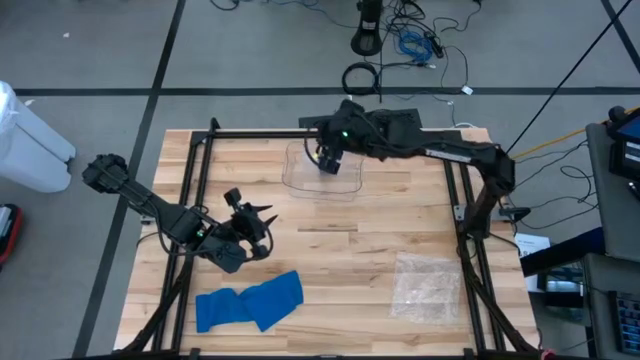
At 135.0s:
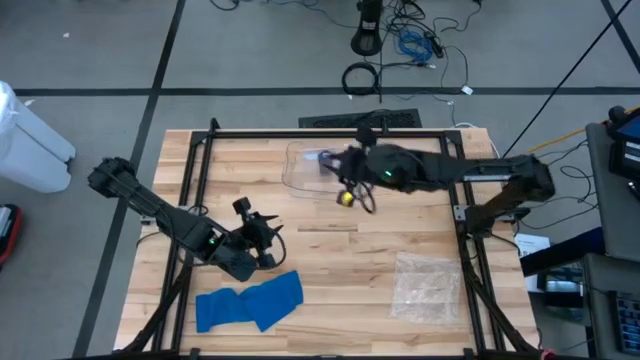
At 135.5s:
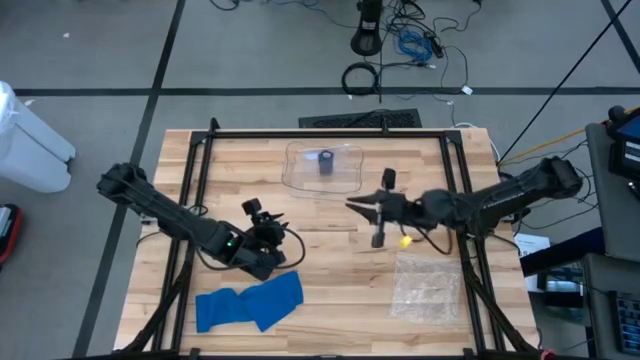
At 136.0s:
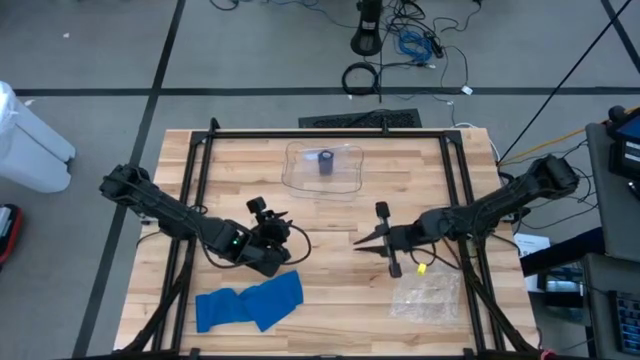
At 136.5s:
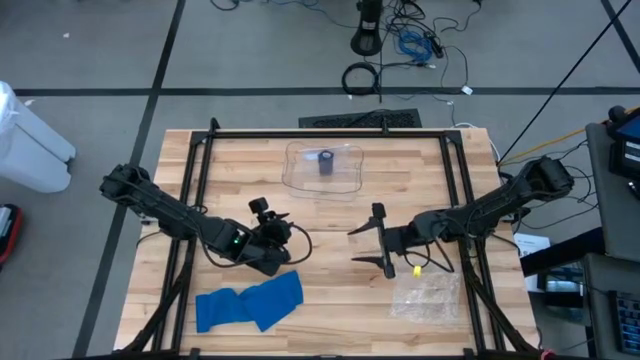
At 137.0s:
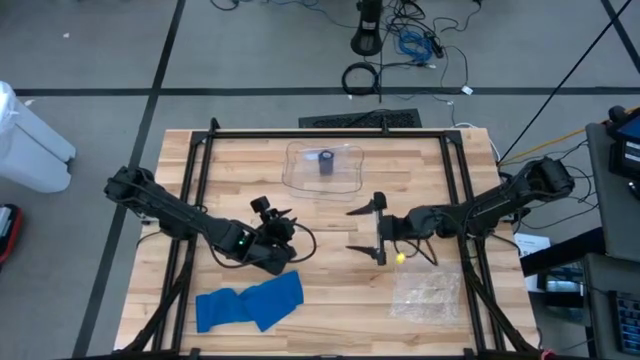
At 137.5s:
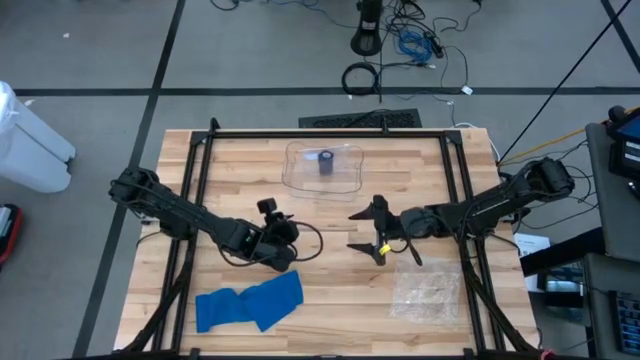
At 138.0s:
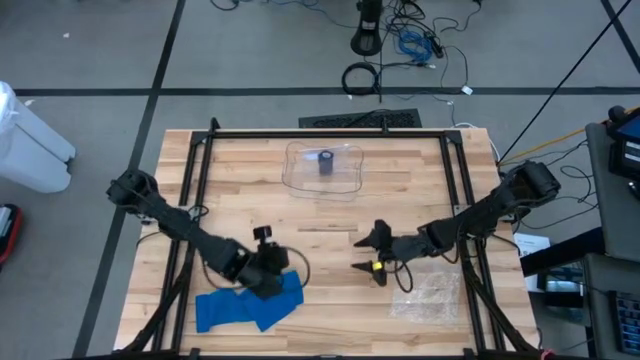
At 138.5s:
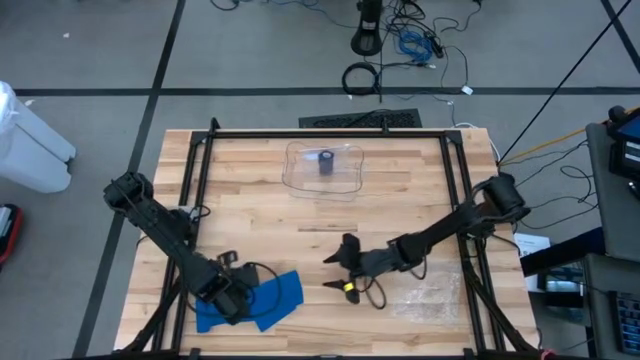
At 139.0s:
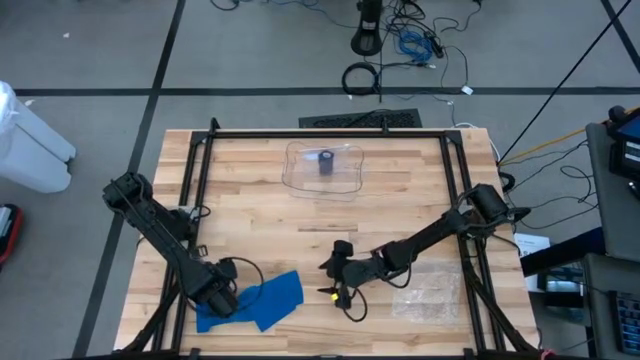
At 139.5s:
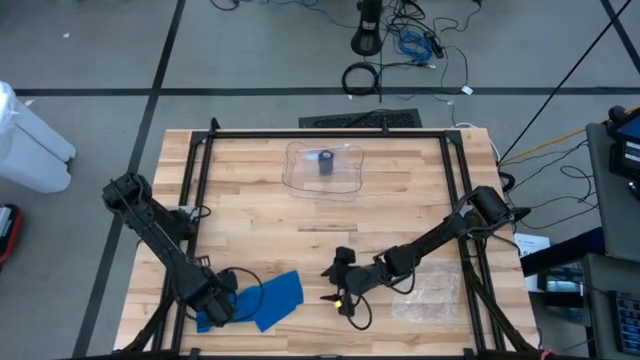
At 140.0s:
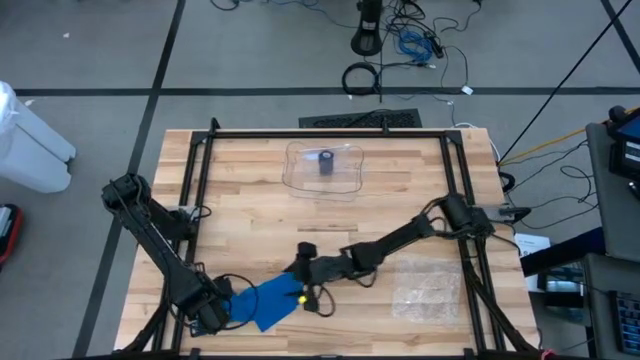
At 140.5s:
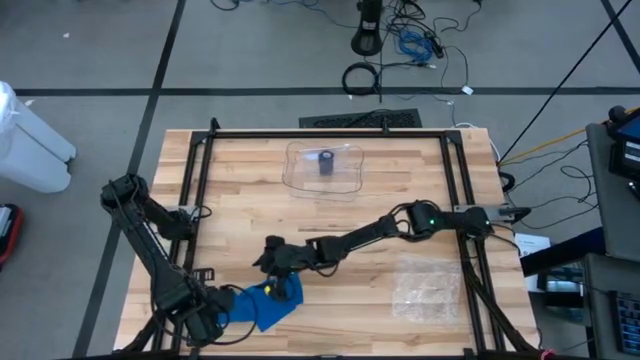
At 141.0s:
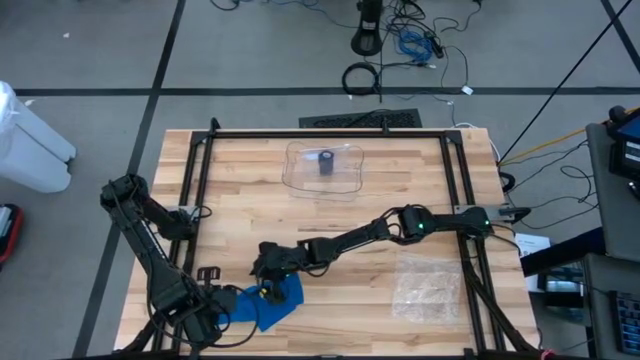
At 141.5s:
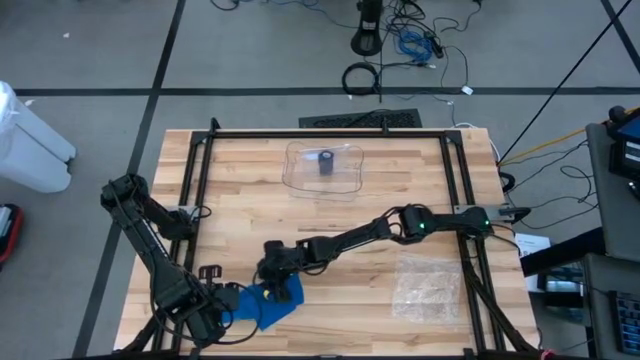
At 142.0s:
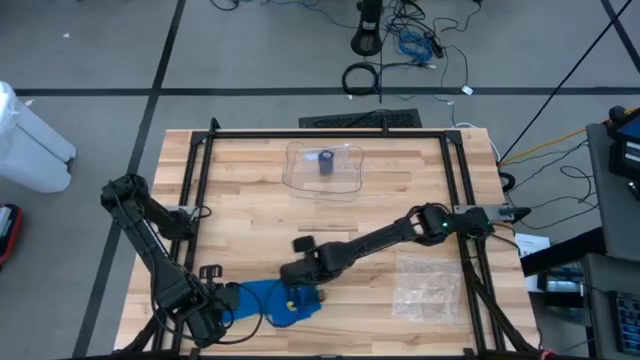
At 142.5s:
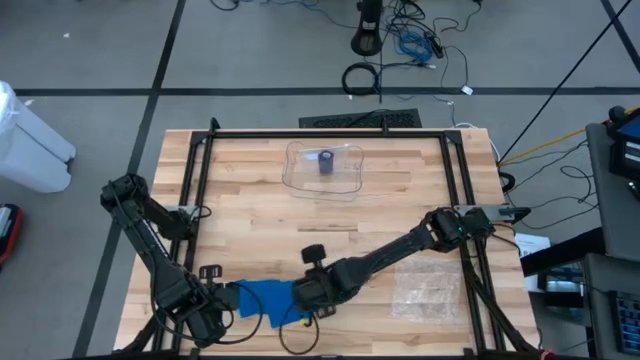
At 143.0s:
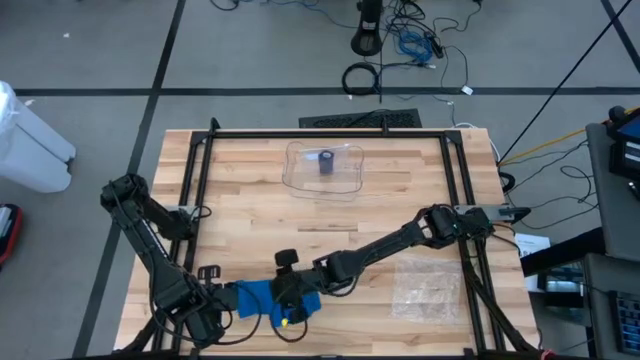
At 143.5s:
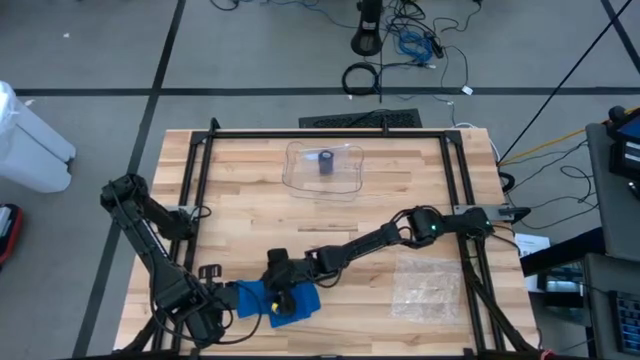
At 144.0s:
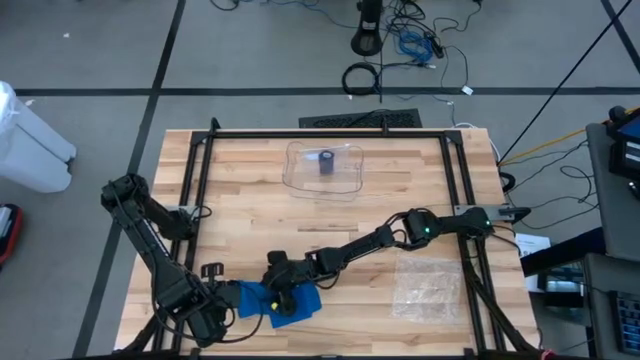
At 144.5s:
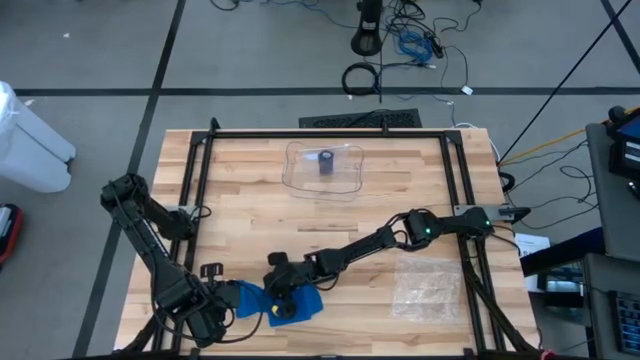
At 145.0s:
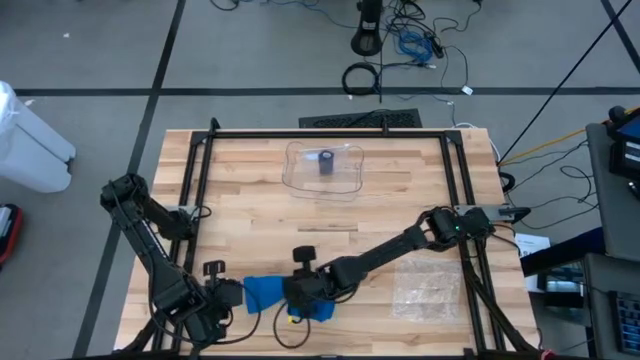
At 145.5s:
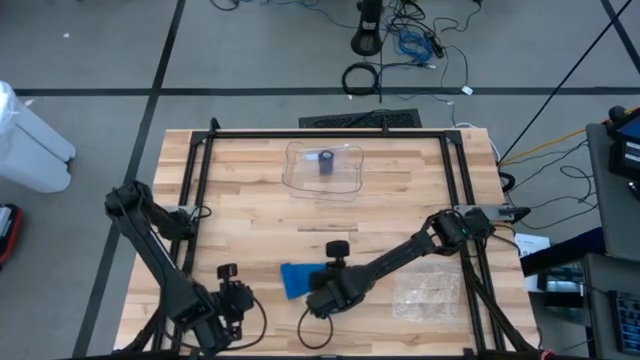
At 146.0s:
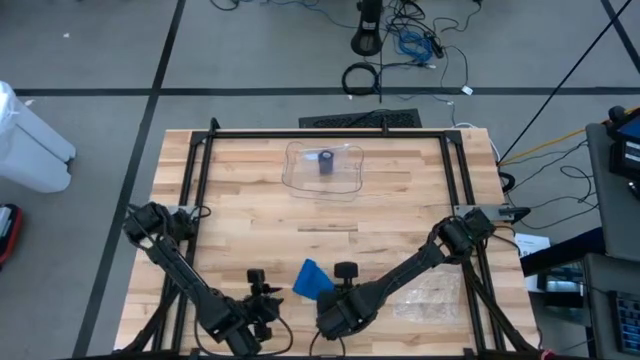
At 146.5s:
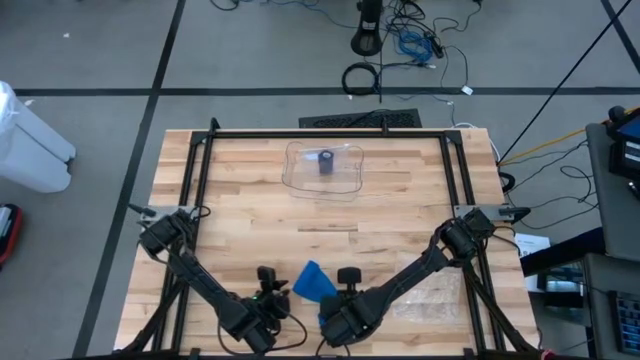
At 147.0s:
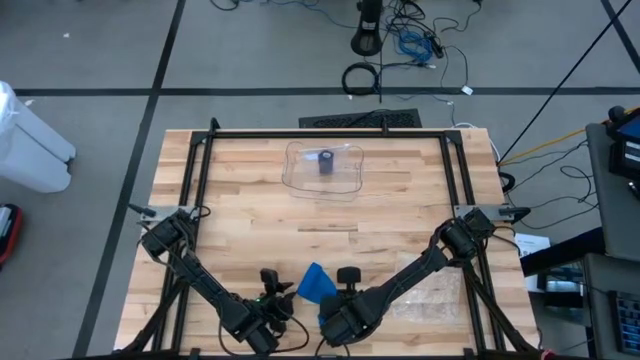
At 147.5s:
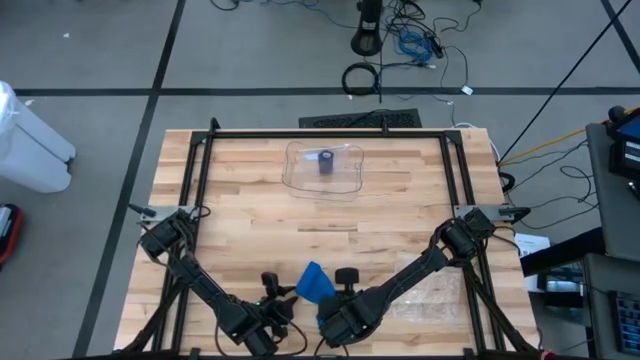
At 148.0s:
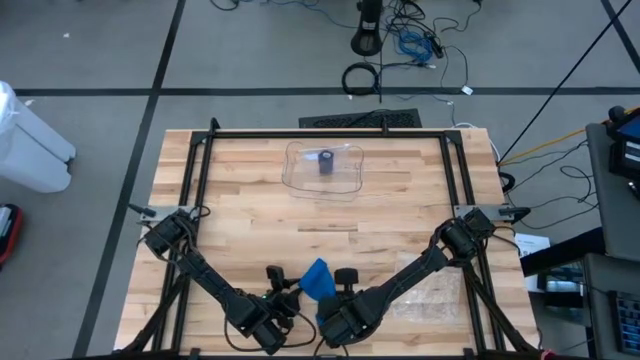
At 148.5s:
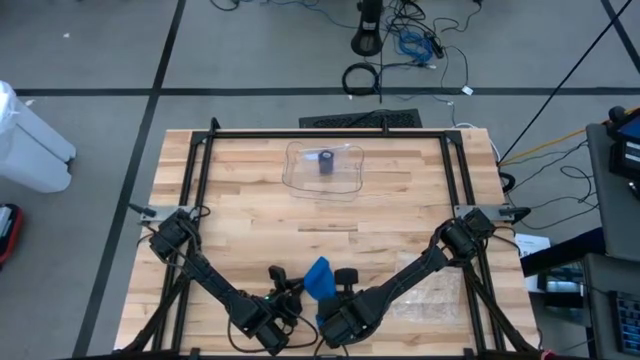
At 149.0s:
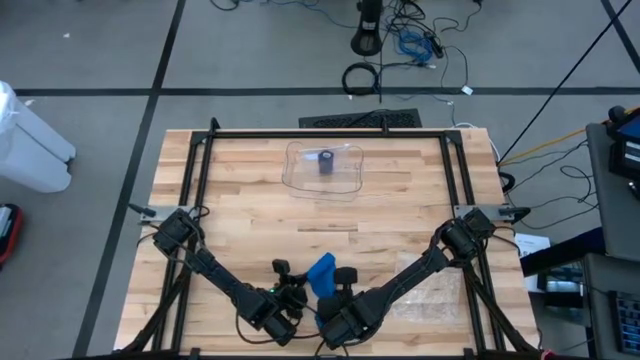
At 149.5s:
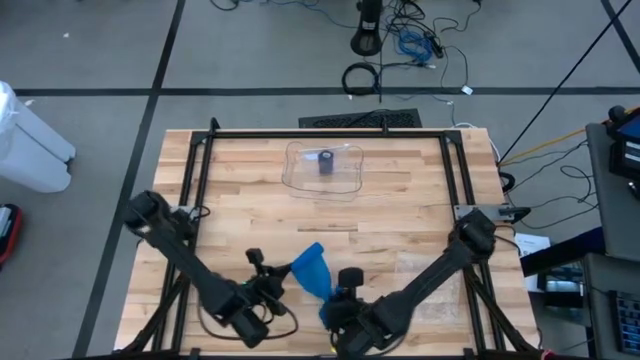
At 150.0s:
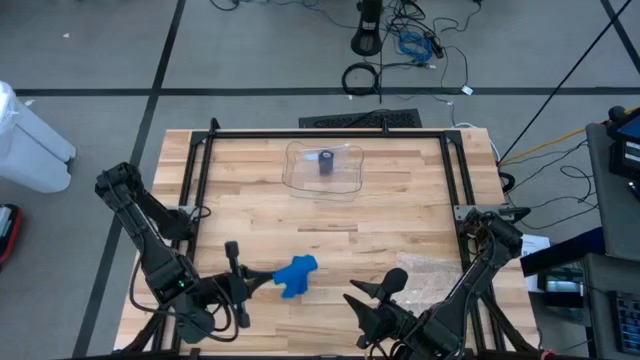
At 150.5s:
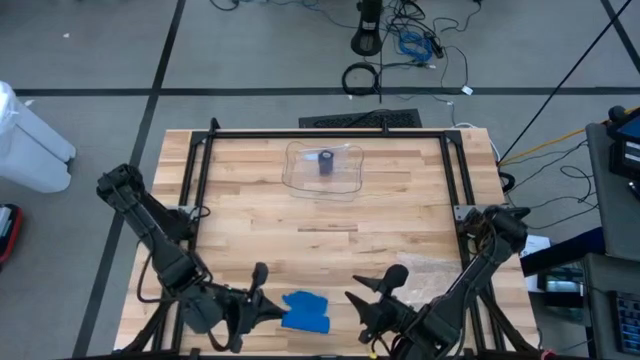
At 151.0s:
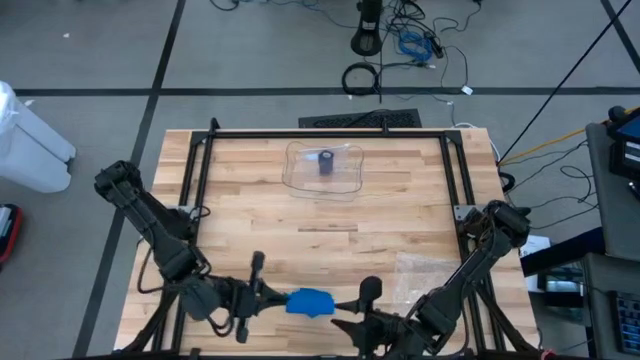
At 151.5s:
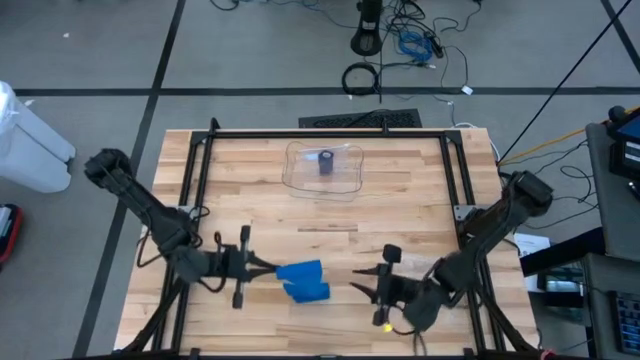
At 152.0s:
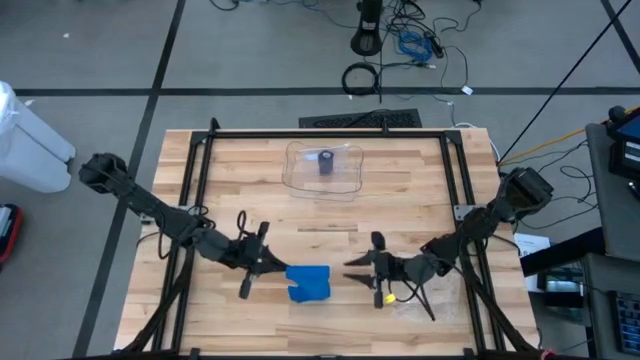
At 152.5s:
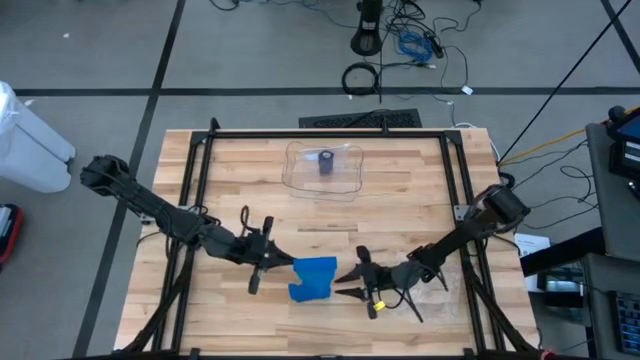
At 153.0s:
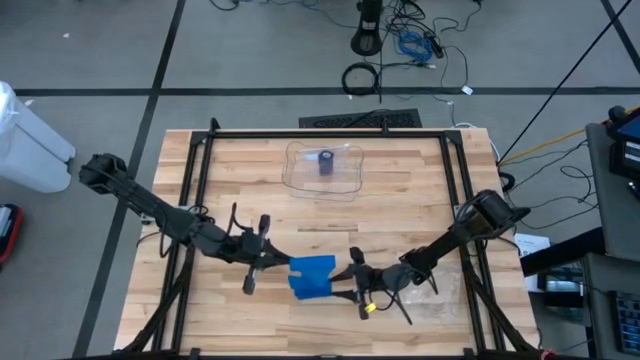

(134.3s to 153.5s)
Task: Roll bandage
Roll the blue bandage
